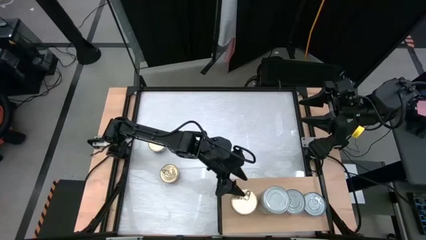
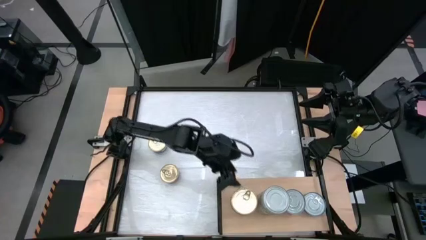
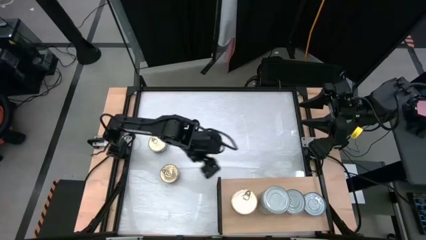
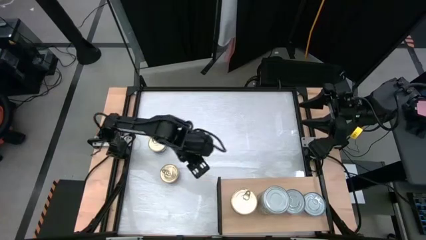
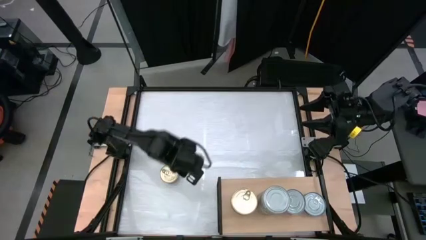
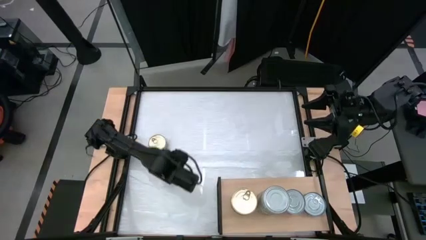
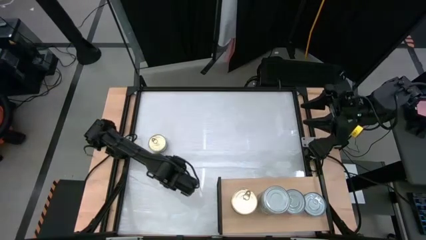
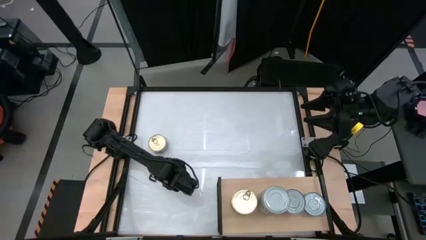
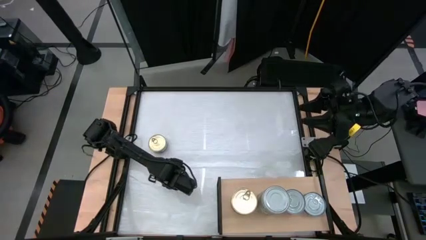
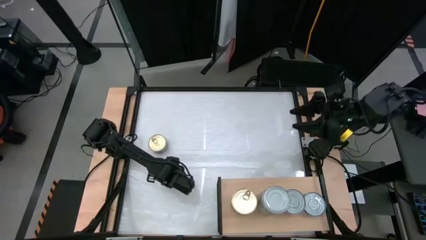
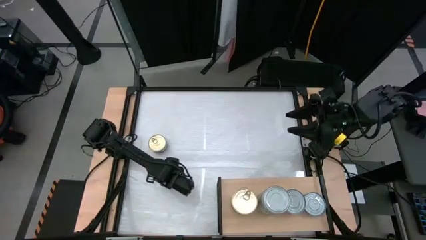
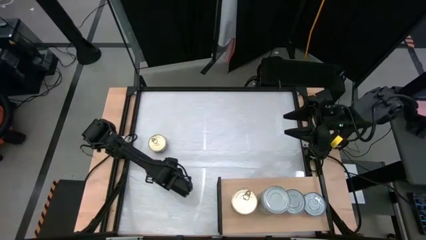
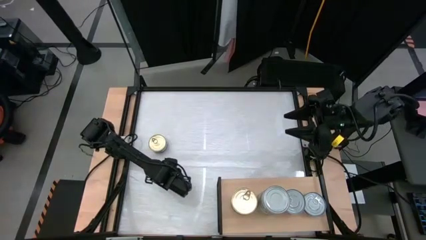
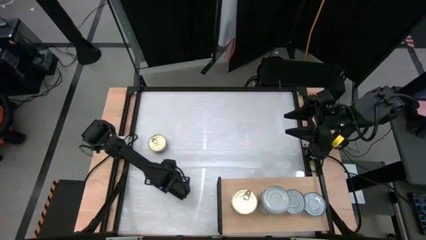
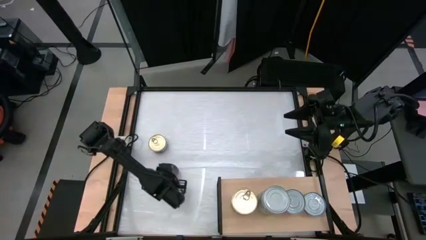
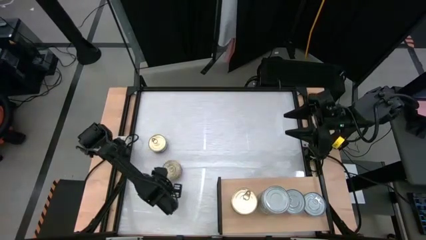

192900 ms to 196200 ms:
Task: Stack canned seafood by type on shelf
Stack the blue and pink tuna can on top of the other blue and pink tuna can on the shelf

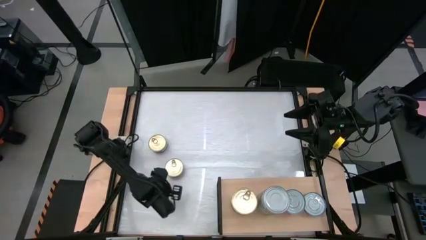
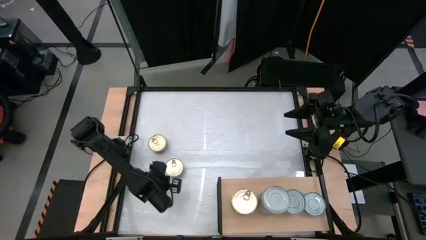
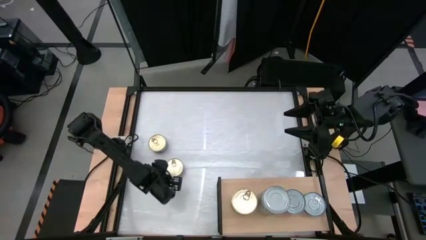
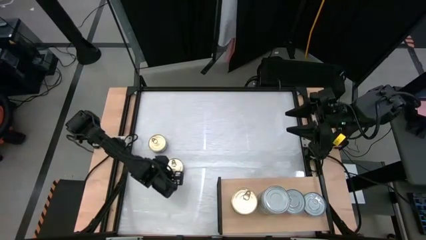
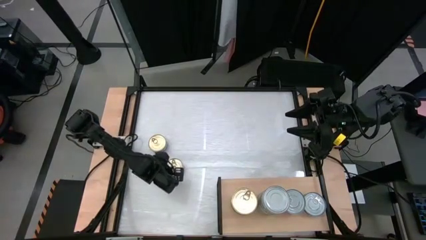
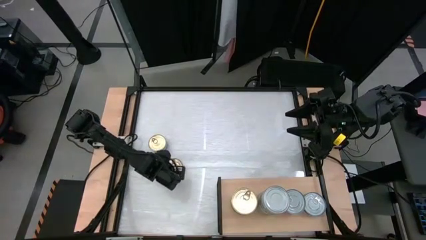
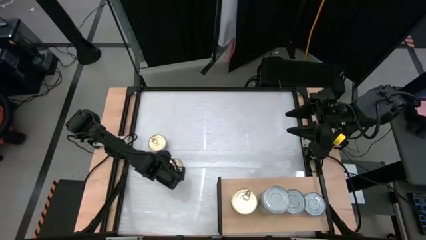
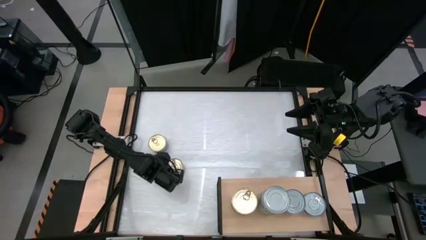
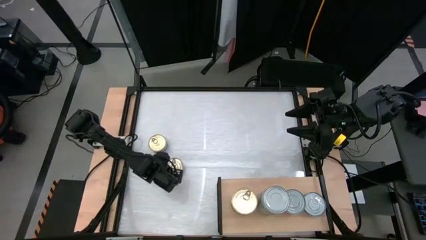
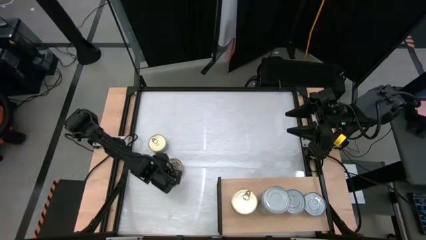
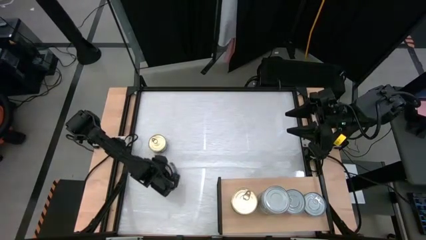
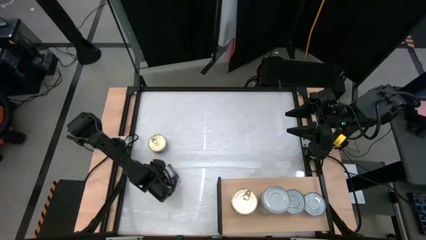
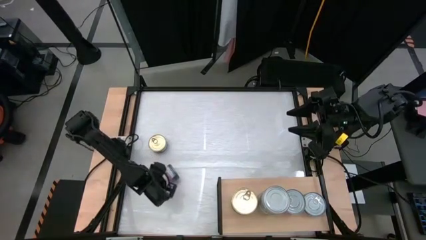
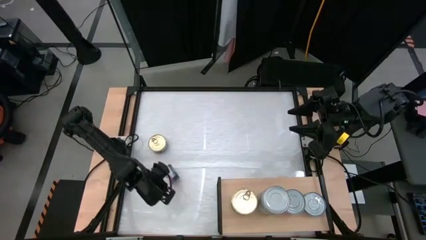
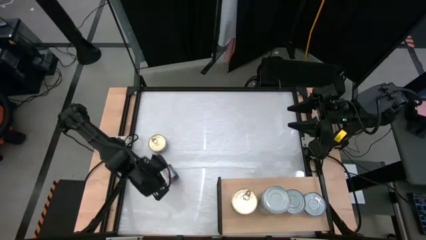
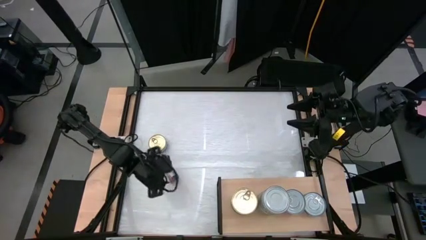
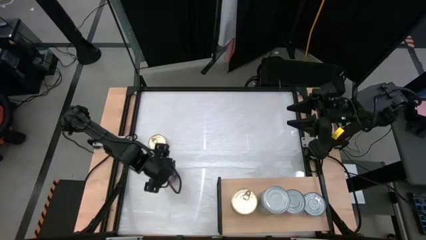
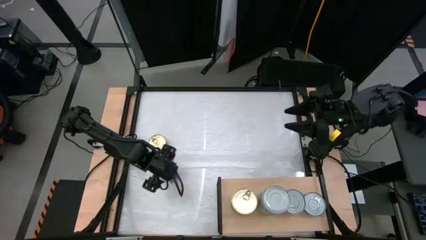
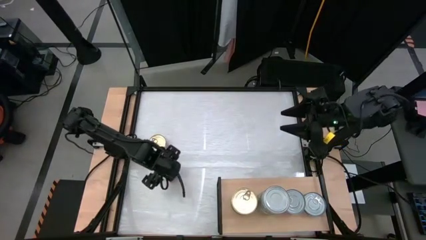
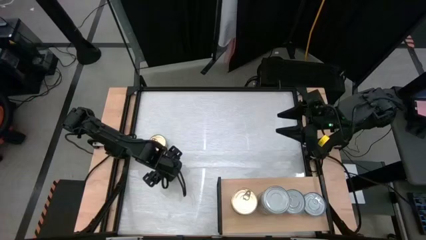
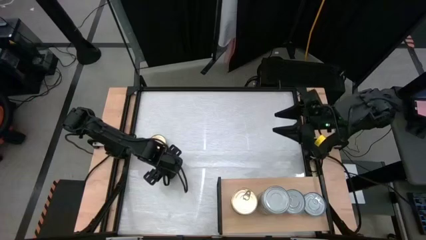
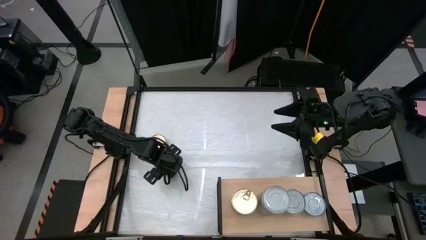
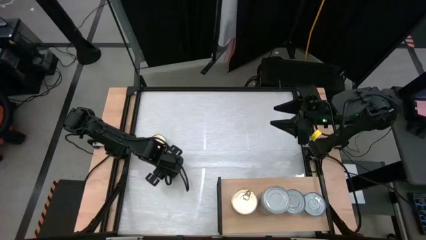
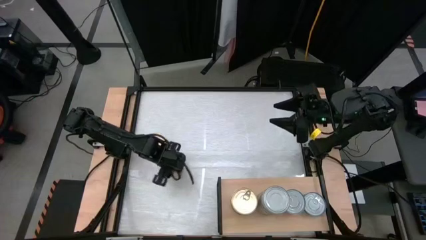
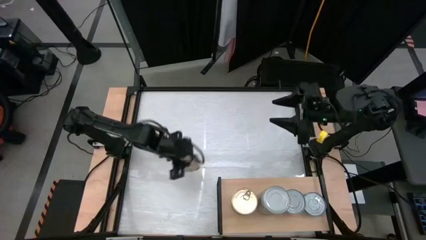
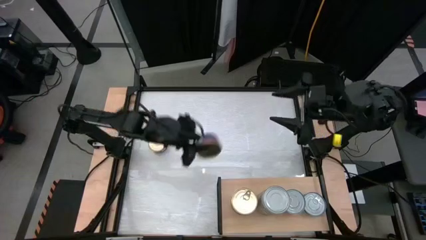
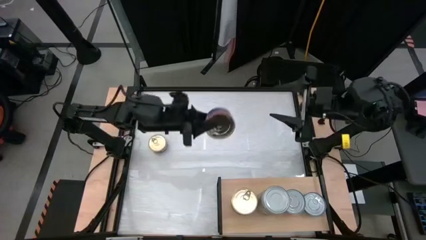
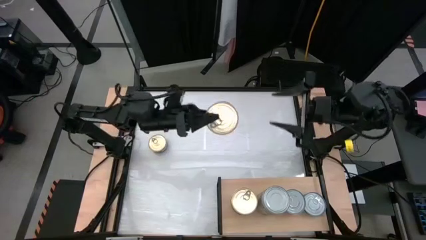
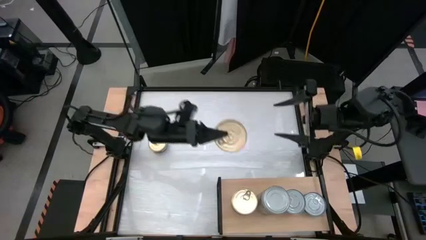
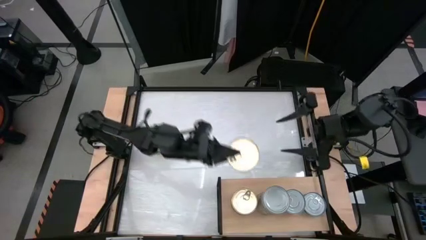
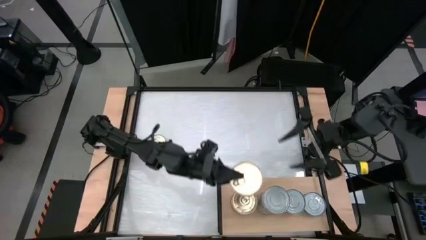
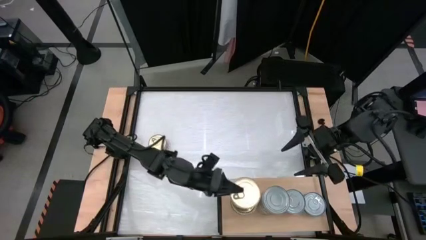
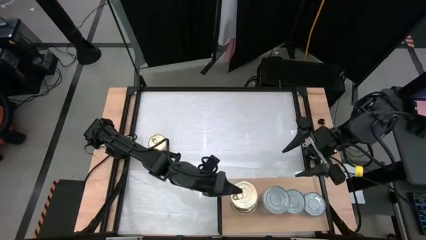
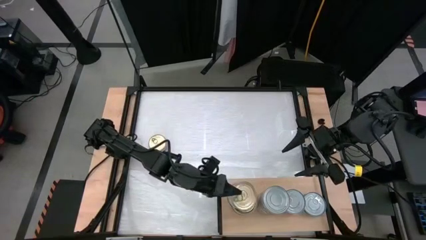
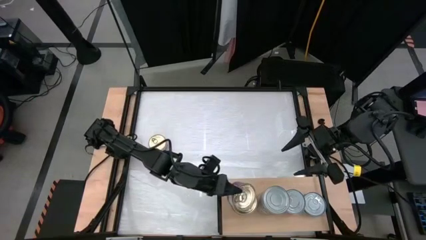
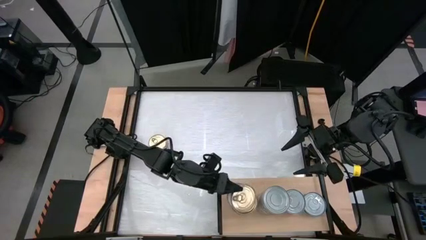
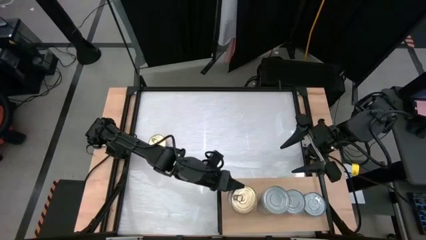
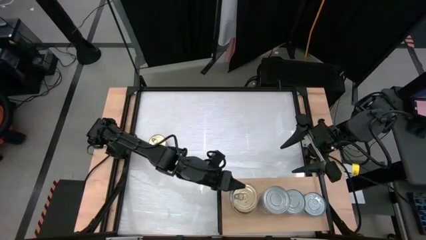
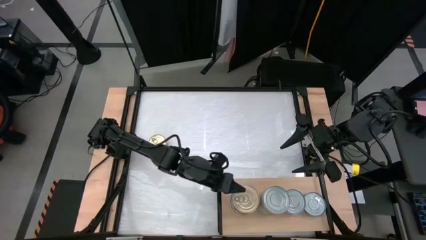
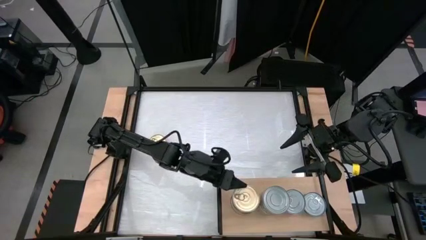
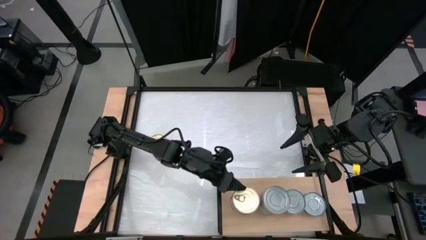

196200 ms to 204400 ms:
Stack the blue and pink tuna can on top of the other blue and pink tuna can on the shelf

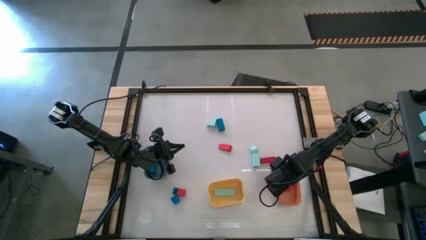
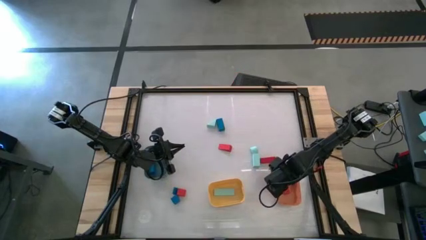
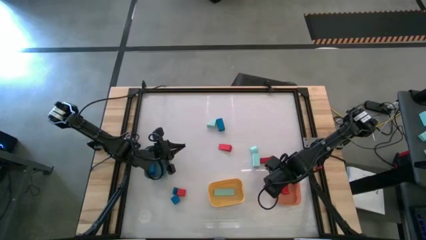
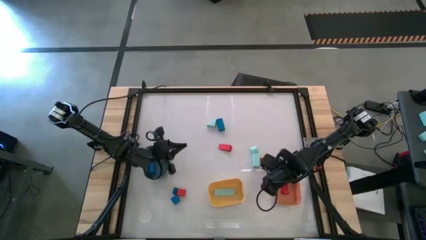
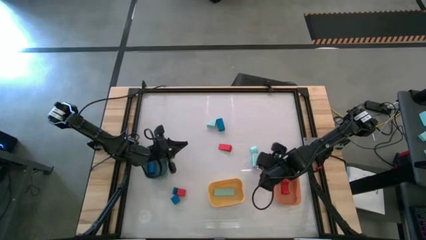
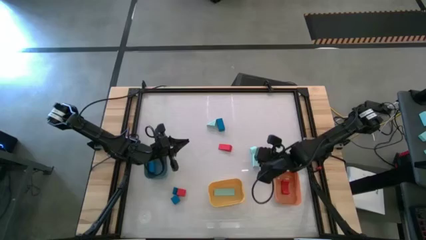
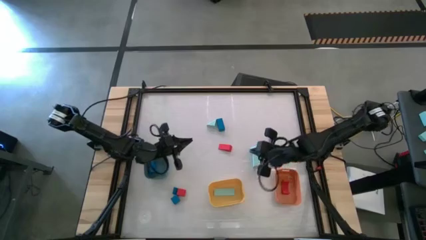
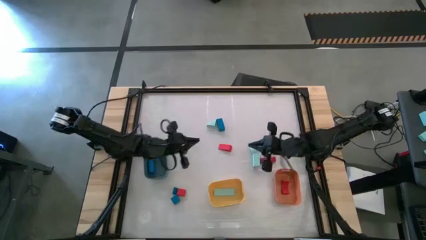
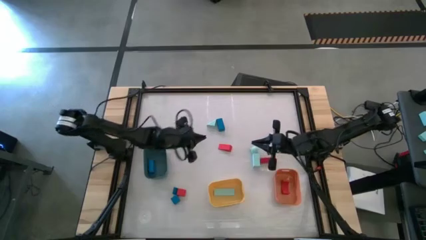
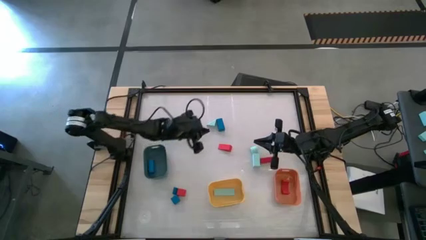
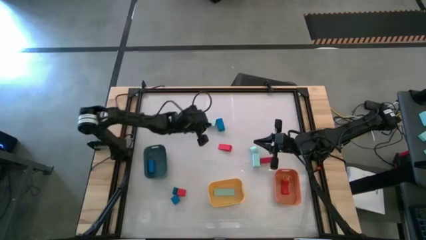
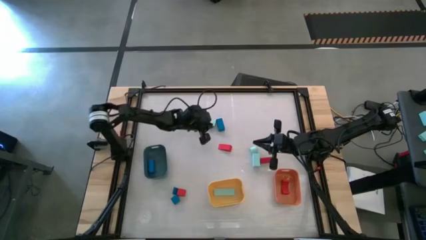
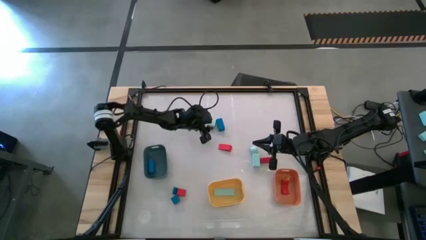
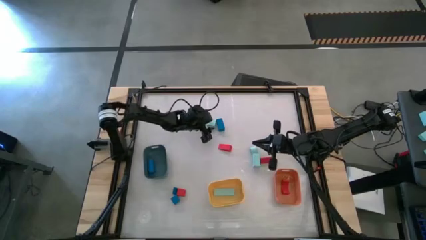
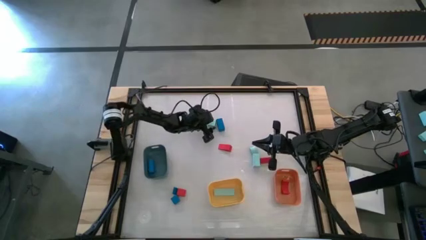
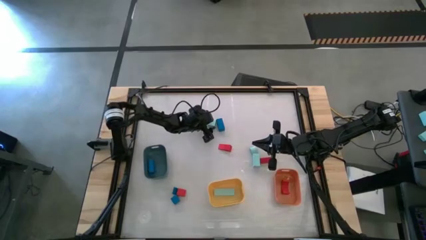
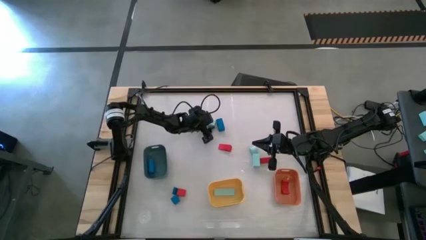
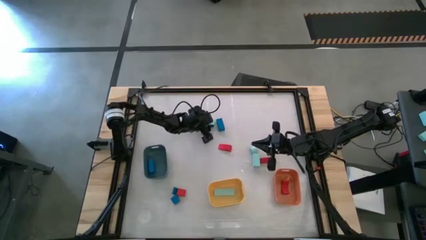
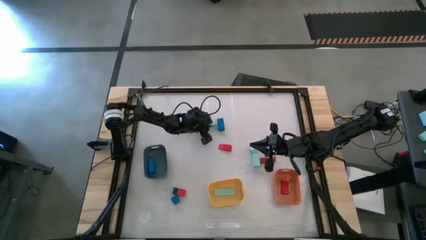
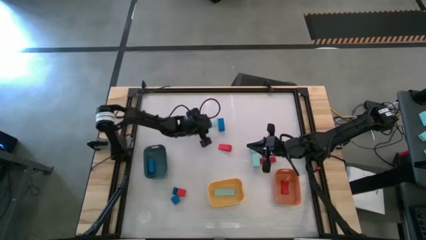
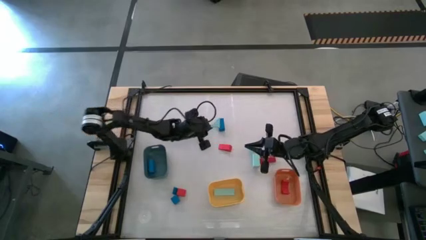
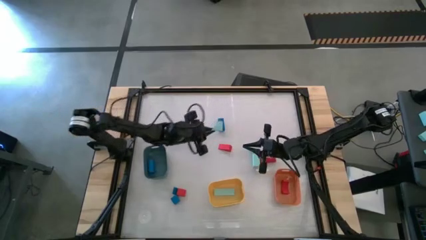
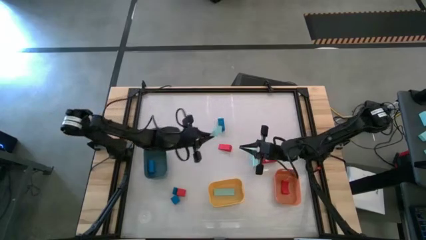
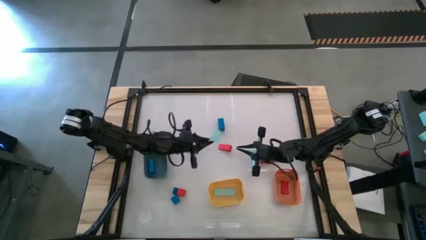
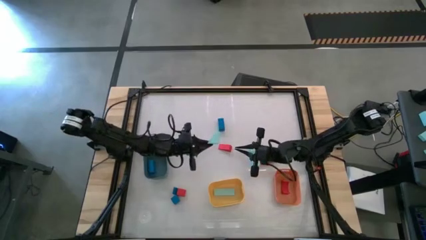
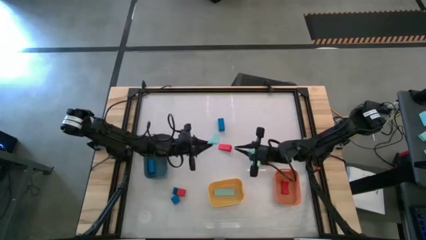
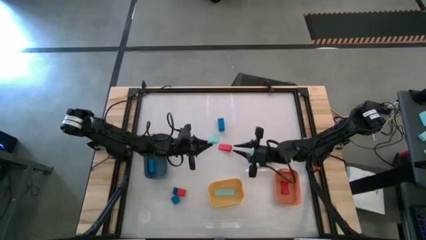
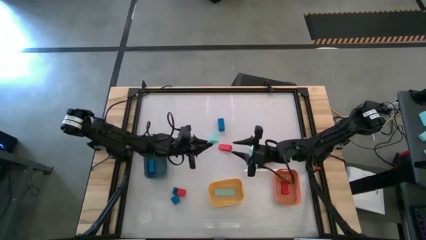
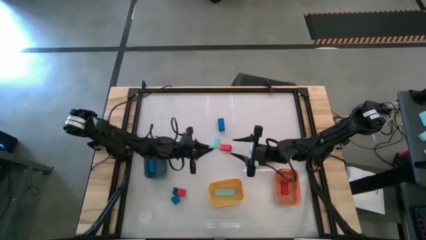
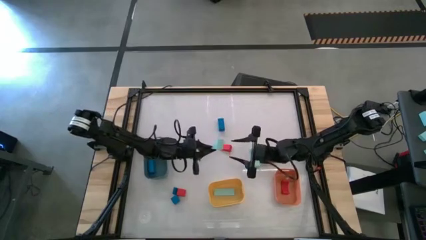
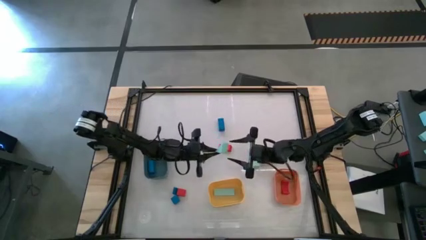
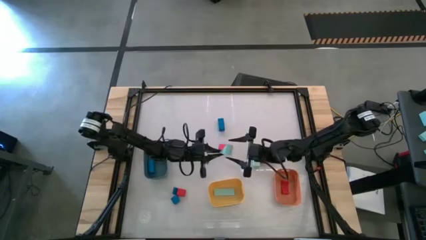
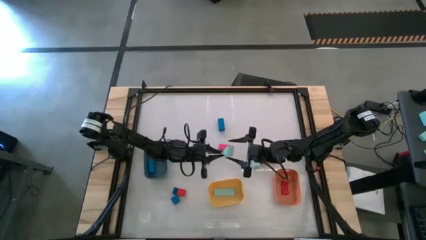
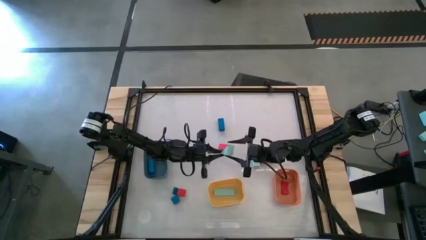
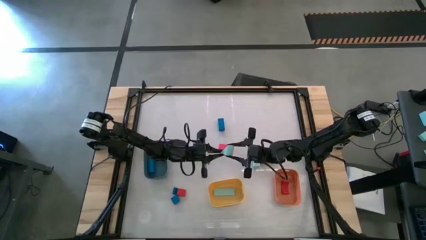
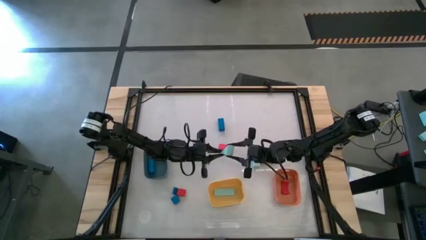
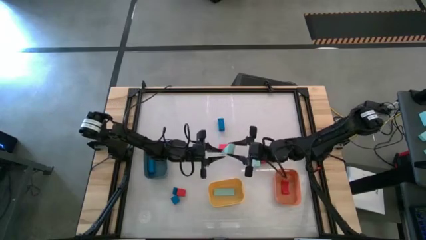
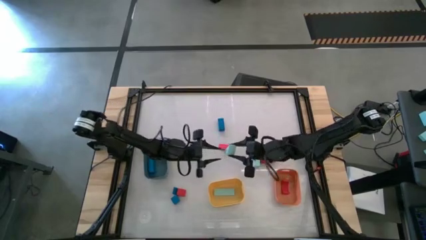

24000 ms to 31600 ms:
Task: Sort & place blocks by color
Put the light blue block into the yellow bin
